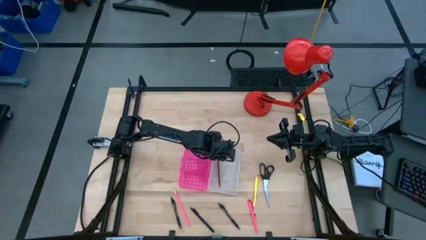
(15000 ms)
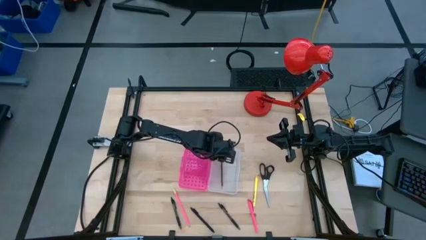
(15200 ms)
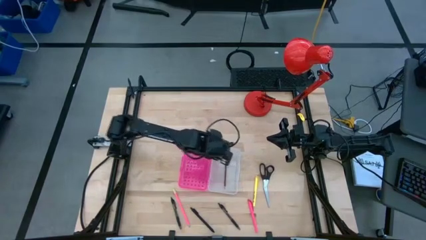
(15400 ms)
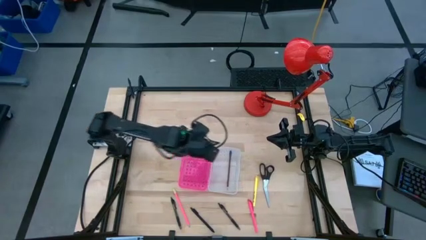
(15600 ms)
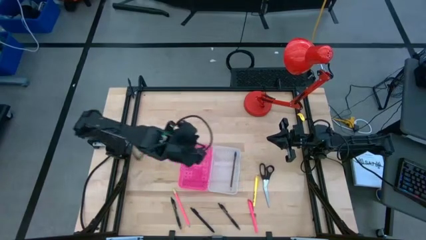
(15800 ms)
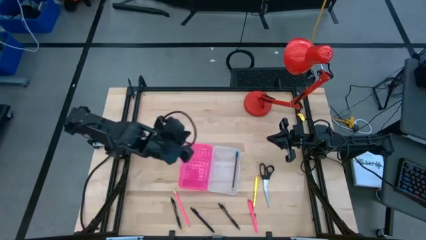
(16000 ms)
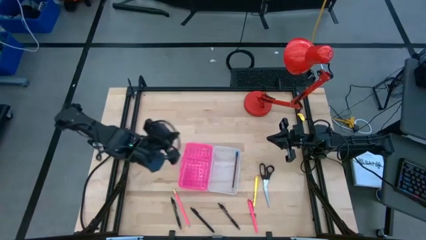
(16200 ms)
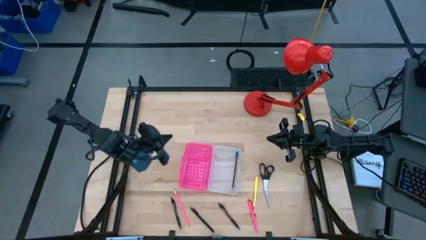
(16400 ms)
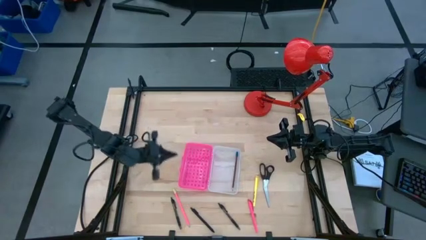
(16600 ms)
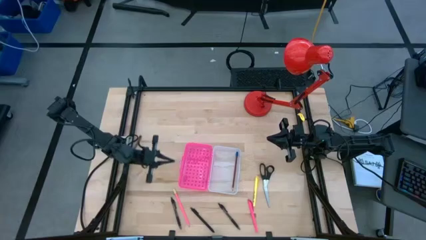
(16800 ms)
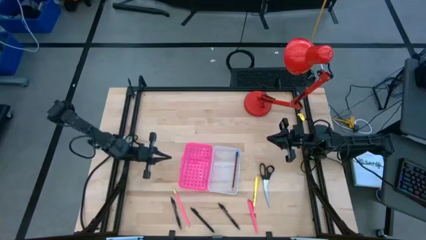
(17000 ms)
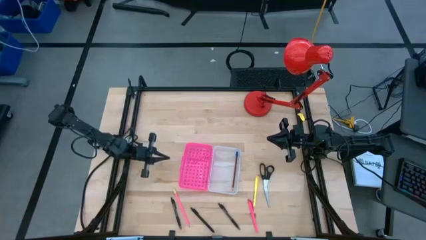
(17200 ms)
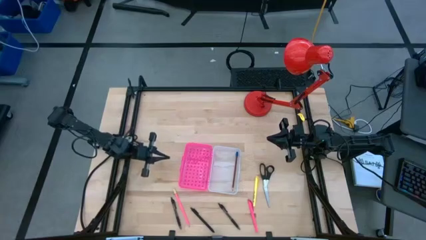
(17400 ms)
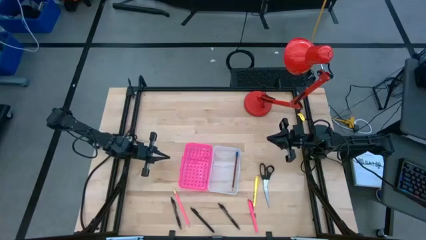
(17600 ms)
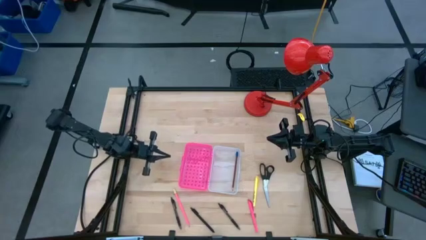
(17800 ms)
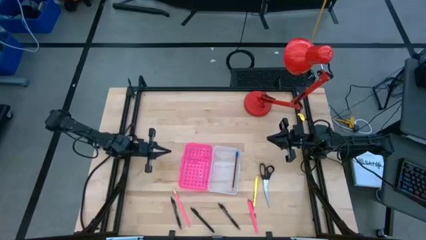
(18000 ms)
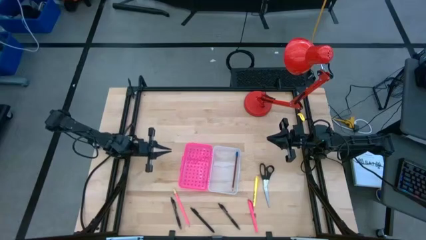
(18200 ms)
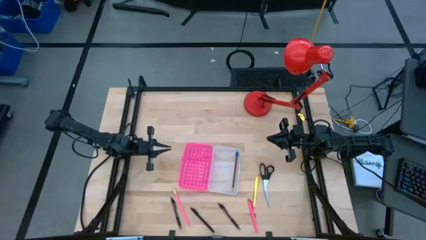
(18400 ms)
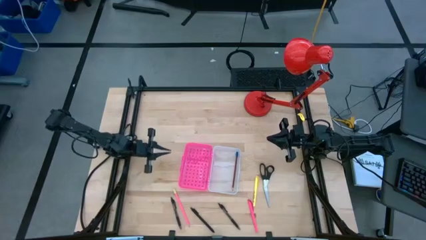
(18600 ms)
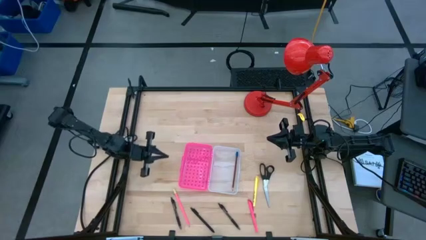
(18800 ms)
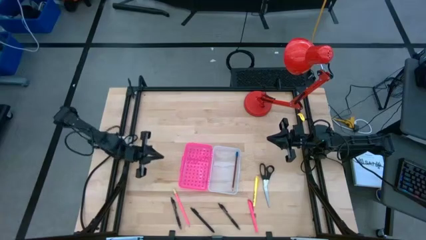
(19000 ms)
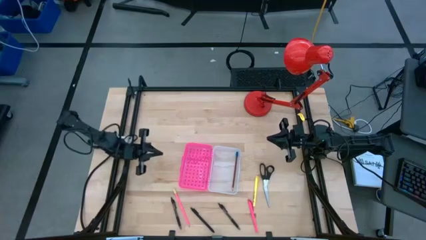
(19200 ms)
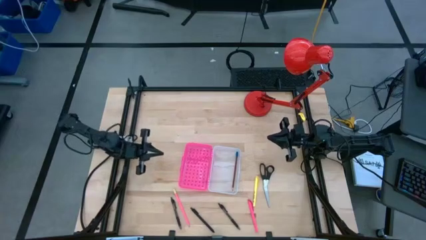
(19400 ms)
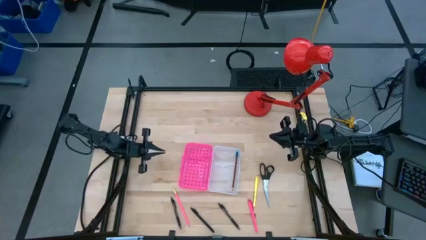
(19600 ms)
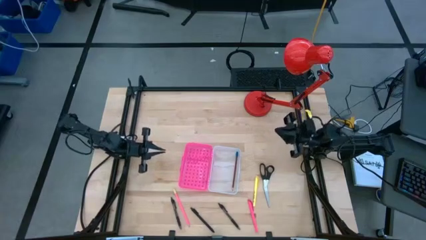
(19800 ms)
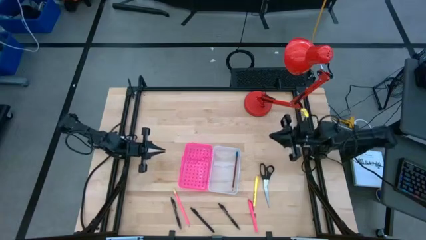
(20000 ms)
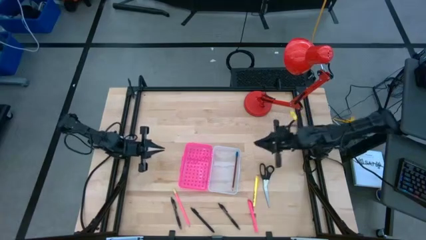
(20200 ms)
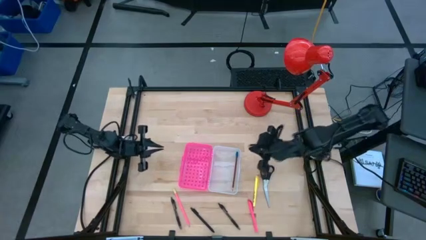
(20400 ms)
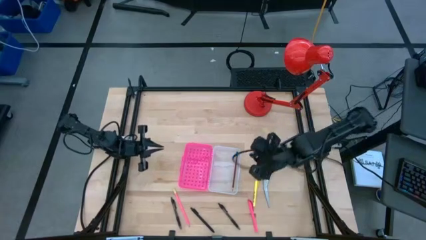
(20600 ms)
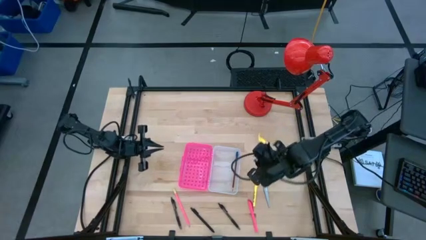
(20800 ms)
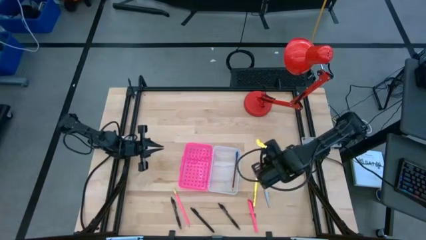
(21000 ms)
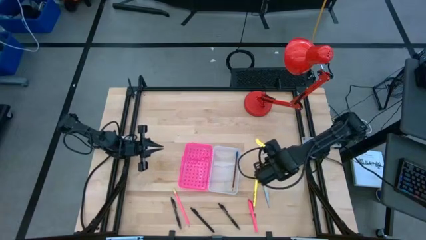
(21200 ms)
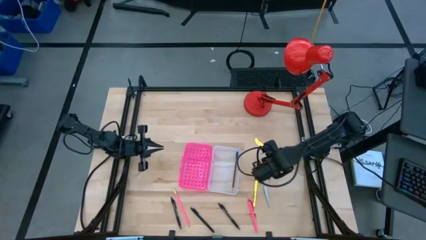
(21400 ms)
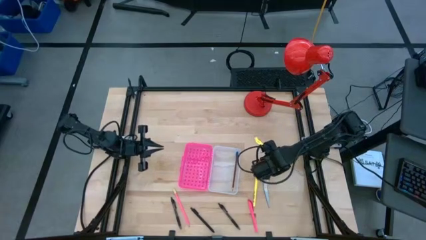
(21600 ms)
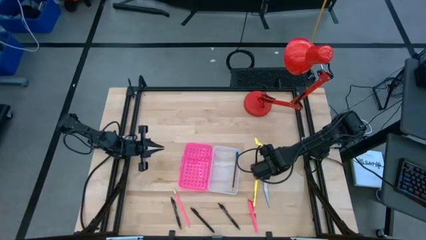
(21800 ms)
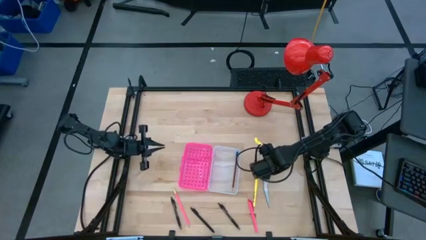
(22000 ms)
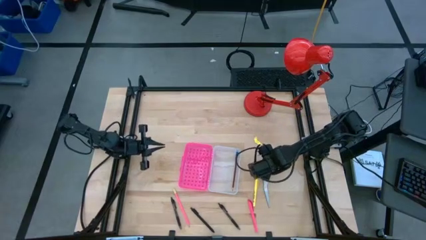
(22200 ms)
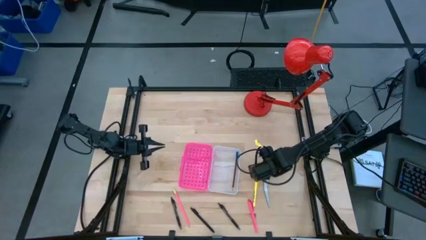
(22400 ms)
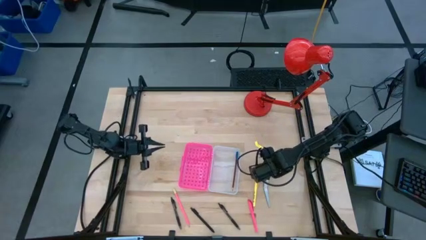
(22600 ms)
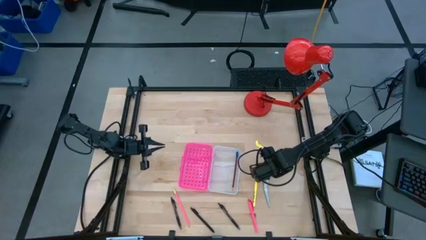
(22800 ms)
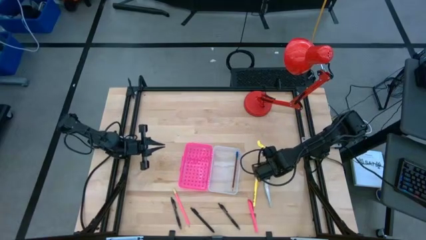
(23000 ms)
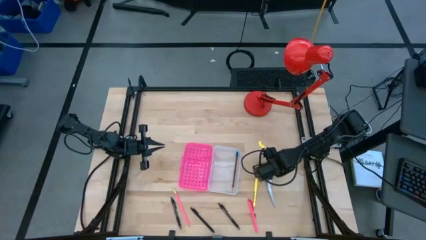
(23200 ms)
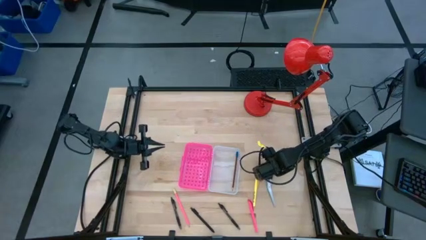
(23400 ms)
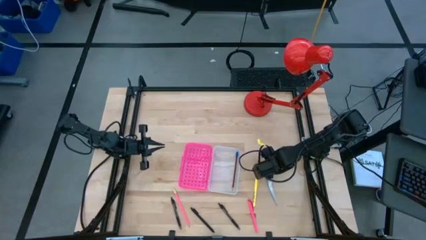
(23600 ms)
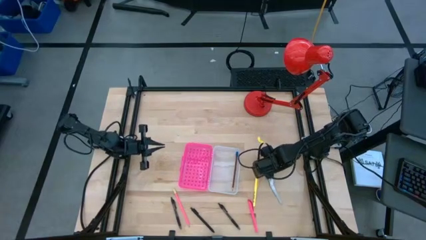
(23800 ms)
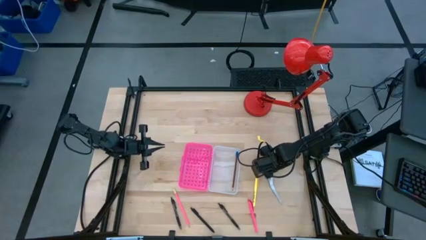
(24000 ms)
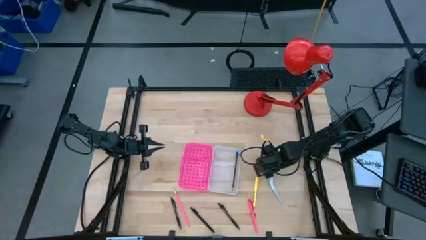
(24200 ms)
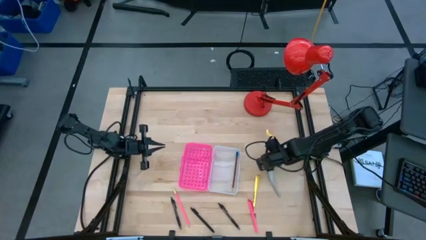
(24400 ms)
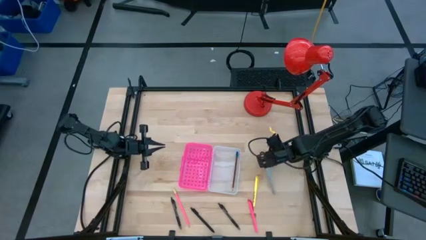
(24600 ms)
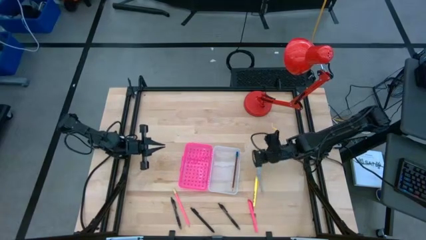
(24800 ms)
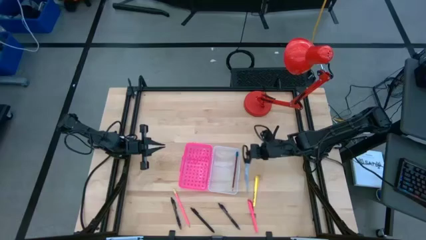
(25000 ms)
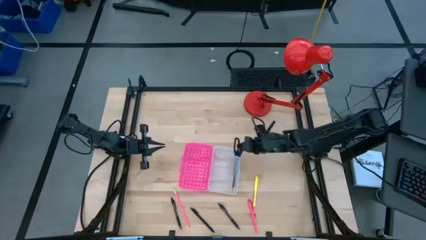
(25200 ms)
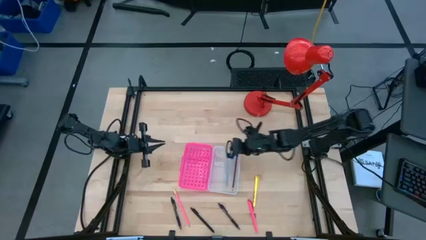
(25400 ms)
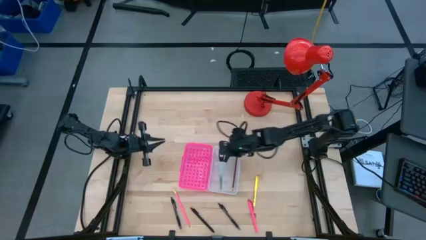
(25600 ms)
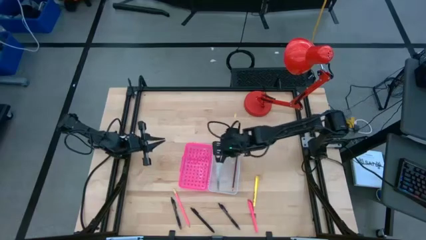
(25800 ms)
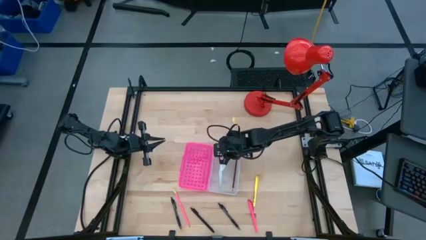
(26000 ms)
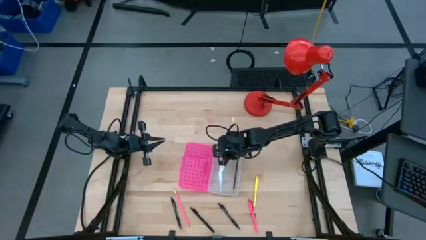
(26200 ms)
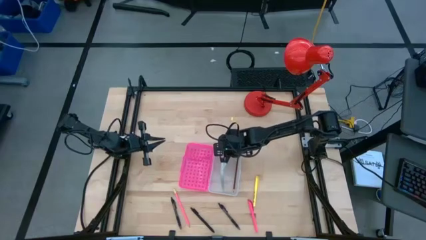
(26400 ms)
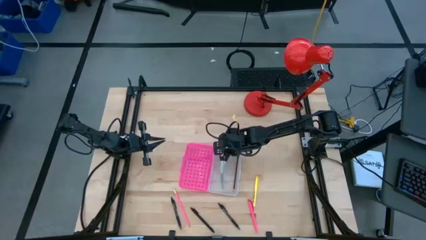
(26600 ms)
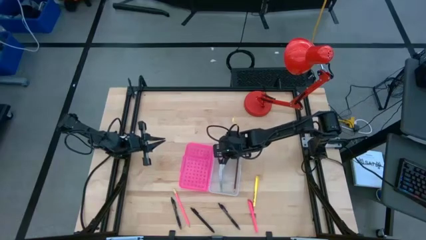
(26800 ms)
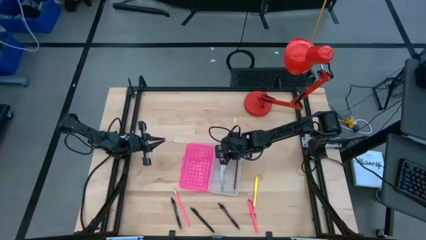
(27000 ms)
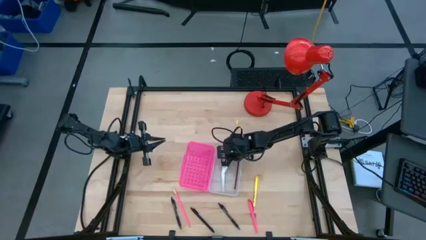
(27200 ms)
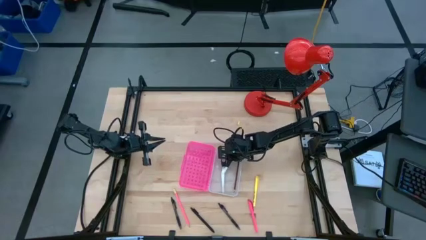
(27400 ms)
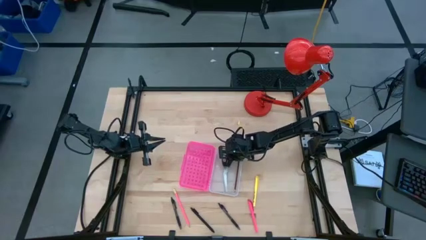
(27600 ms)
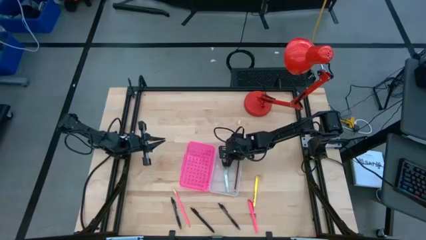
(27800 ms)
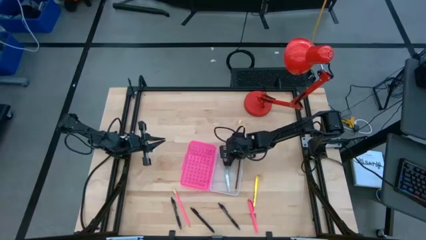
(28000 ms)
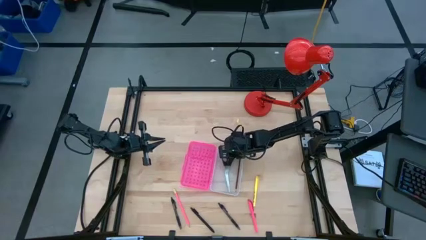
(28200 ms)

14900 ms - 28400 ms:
Task: Pick & place school supplies into a supply box
Put the black scissors into the pink box
